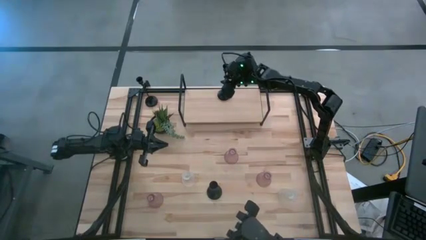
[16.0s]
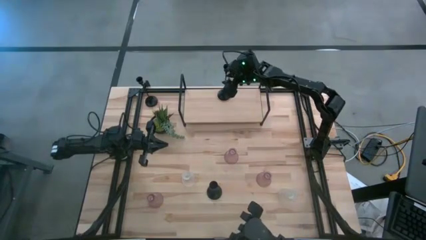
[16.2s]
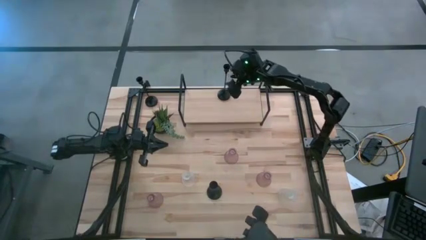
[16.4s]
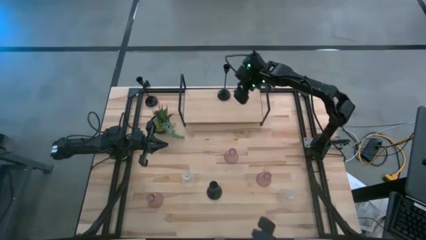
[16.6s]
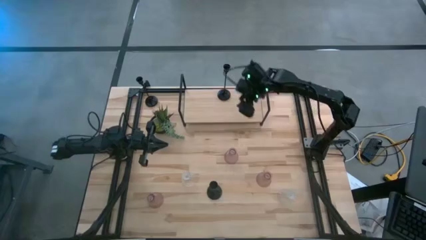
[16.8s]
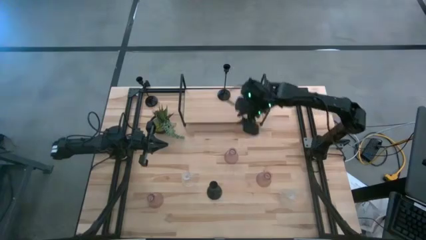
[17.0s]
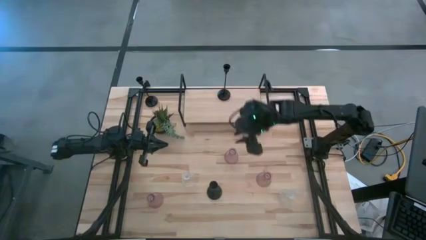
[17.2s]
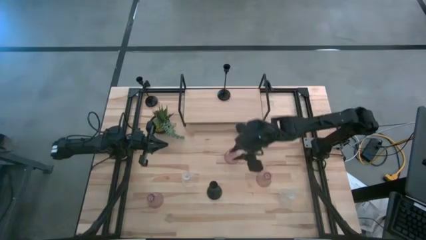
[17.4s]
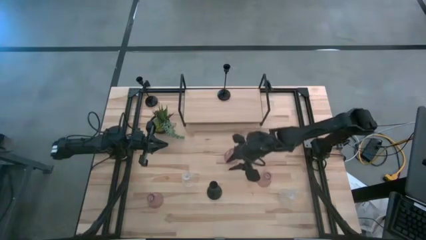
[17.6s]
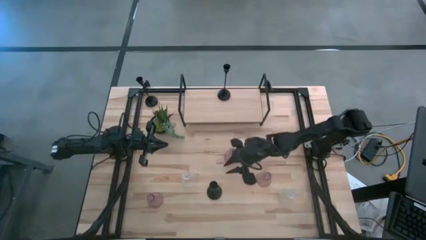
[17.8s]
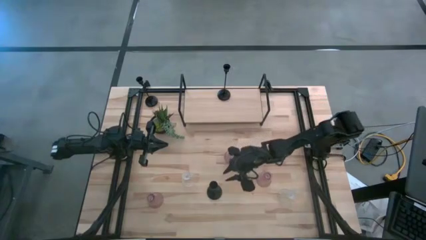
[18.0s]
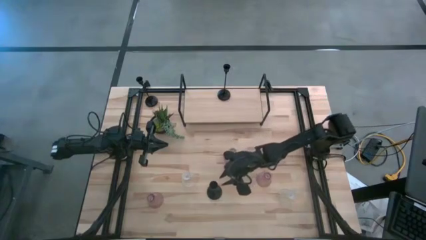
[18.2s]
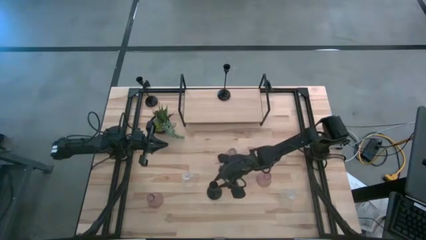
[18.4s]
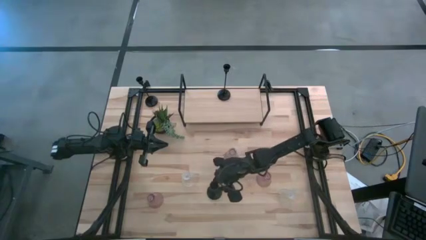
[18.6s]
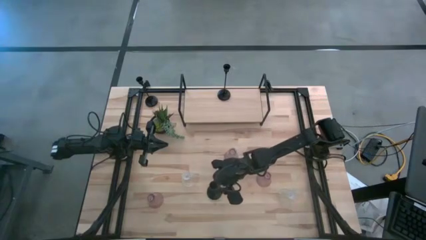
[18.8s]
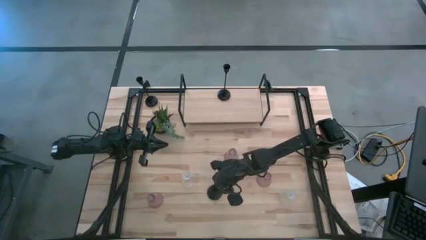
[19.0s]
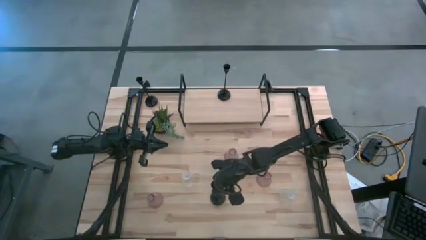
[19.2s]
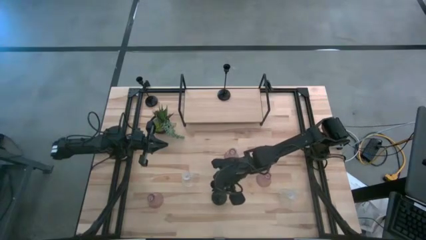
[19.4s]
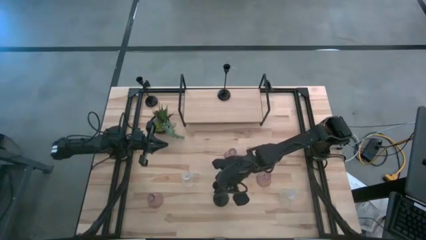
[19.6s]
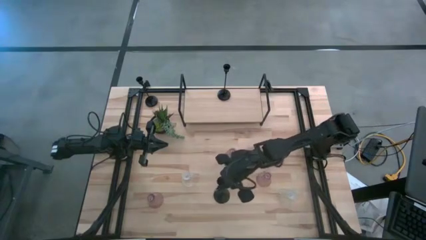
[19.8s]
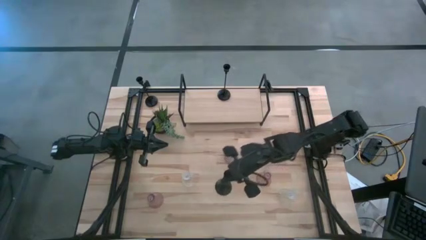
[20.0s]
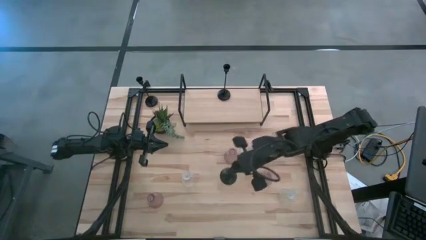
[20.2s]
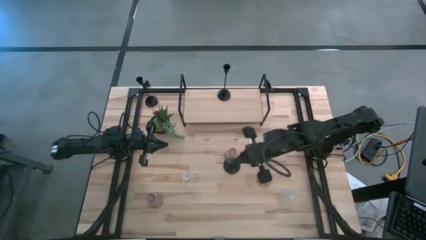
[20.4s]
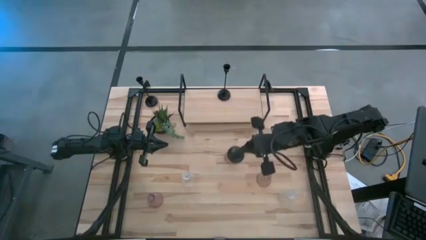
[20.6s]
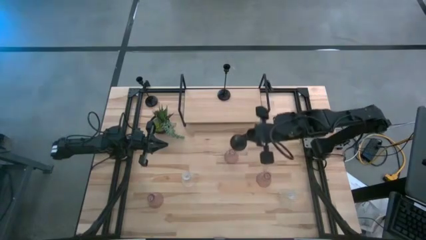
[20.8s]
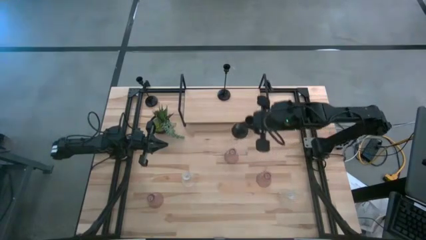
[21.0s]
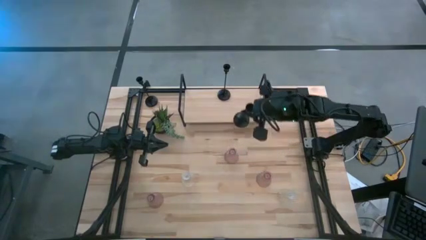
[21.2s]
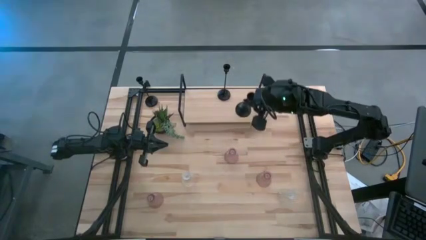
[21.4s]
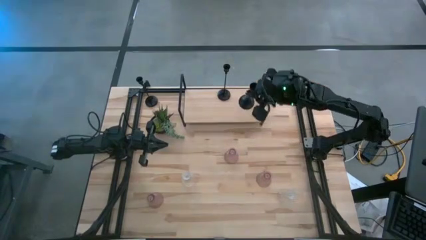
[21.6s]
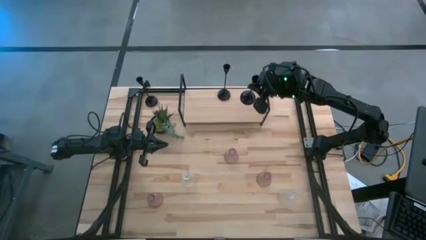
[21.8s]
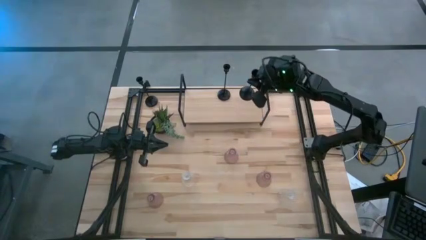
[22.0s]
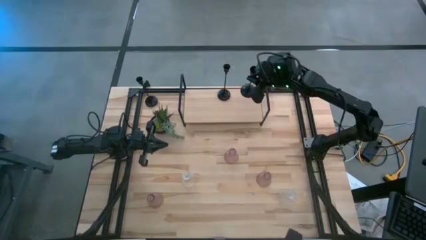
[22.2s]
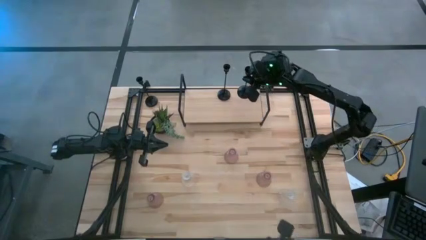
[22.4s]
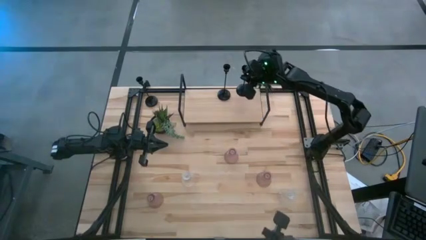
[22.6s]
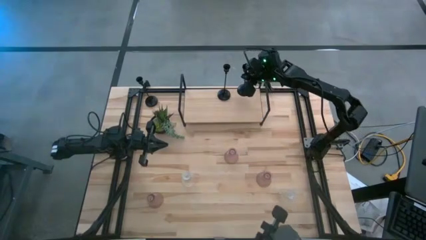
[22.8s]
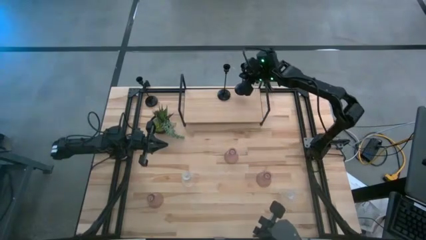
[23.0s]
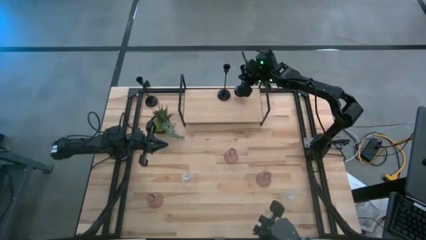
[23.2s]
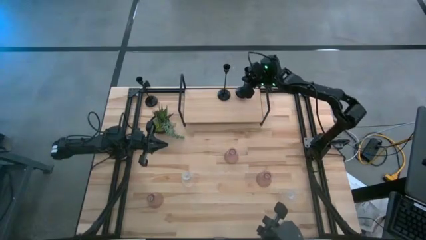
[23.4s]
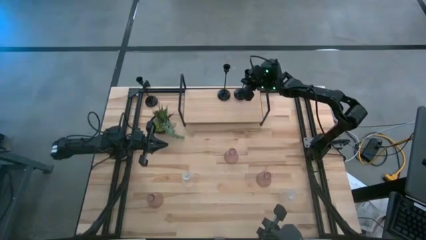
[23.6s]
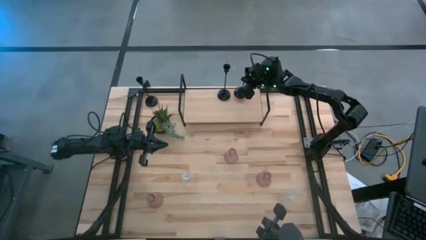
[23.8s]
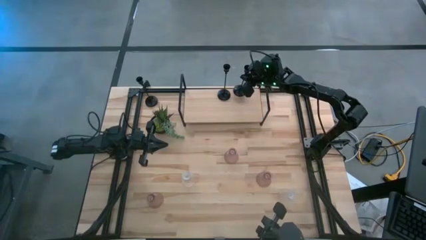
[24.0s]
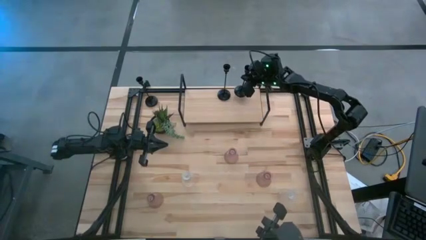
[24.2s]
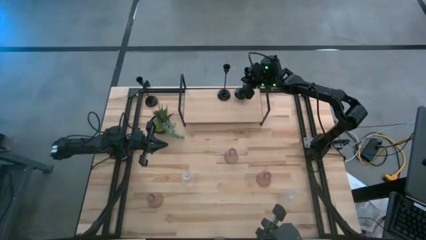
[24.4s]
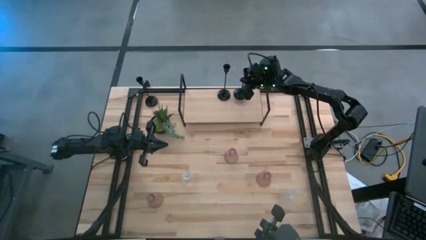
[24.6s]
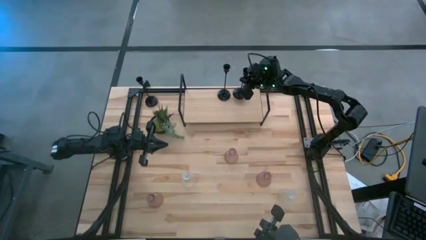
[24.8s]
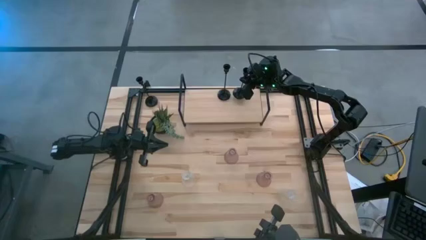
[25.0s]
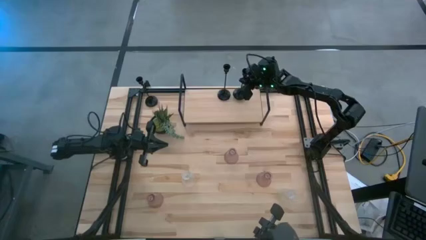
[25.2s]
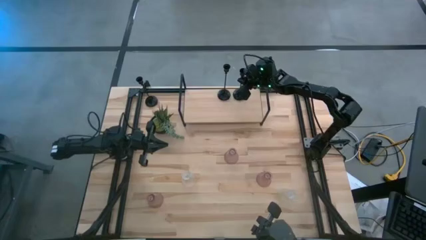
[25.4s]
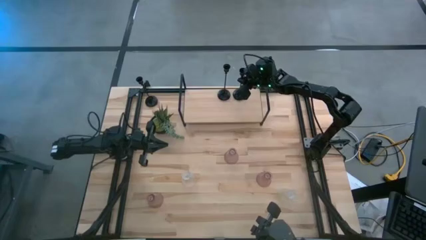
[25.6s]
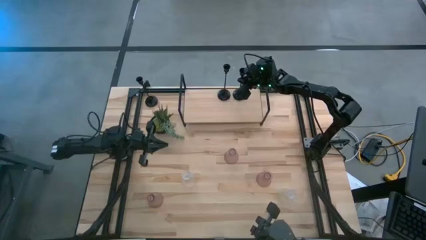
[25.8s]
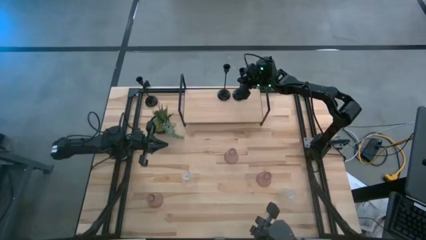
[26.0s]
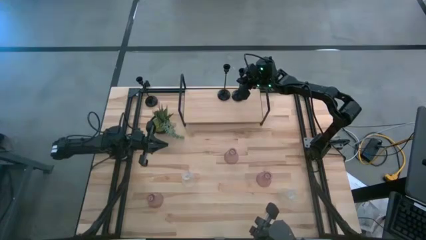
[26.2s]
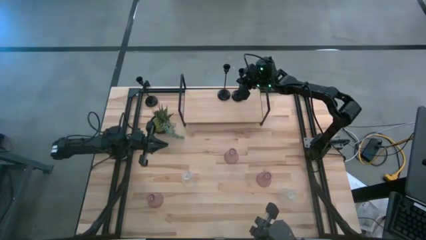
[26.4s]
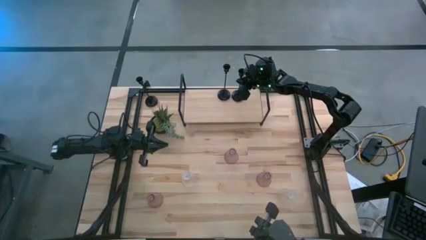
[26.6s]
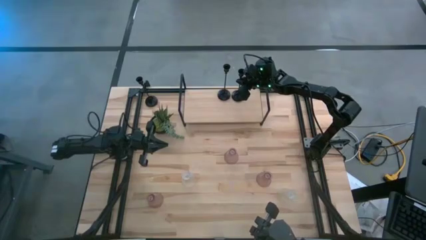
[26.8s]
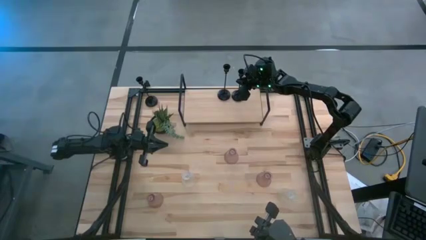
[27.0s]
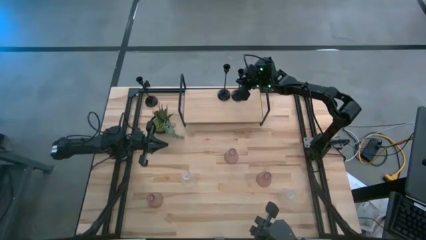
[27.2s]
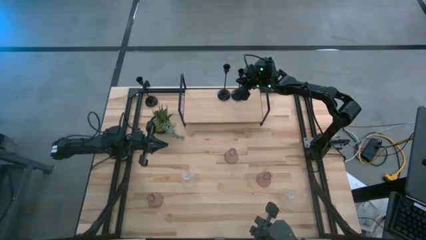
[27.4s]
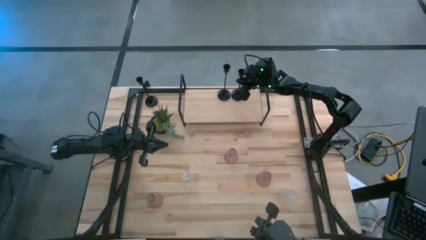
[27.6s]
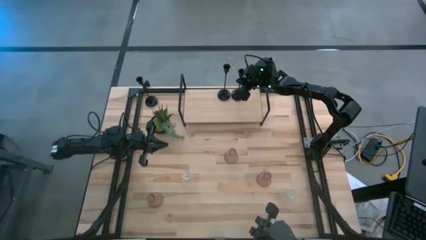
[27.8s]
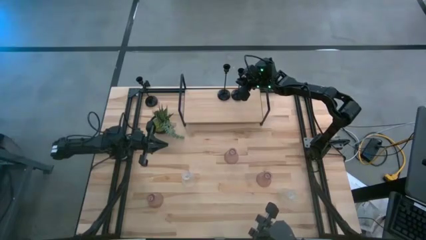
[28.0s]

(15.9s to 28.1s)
Task: Pick & Place candle stick holders
Put the bottom black candle holder on the shelf aligned with the other black candle holder

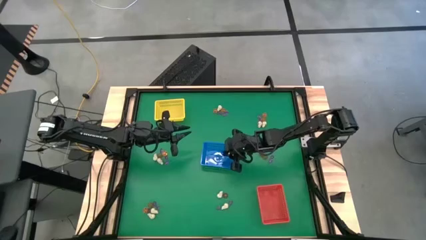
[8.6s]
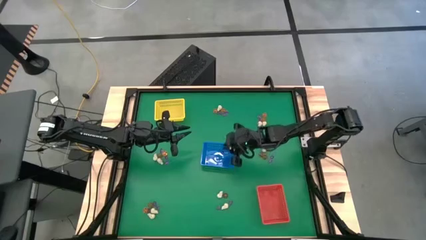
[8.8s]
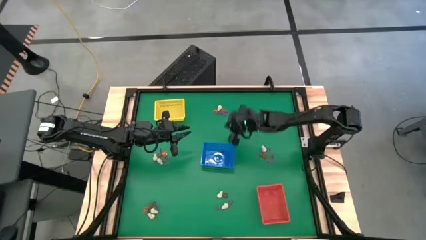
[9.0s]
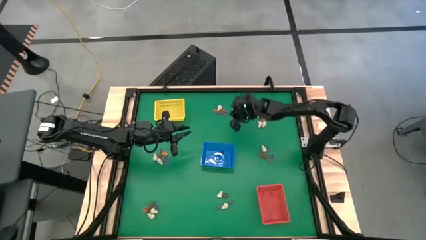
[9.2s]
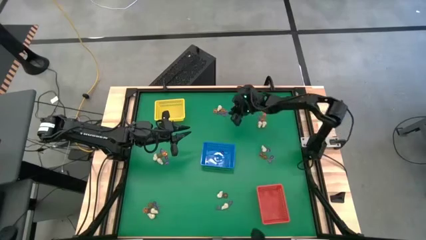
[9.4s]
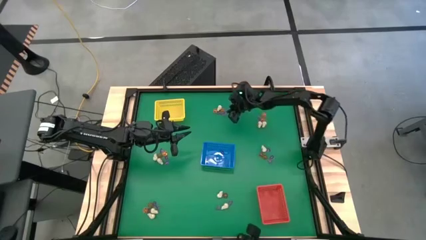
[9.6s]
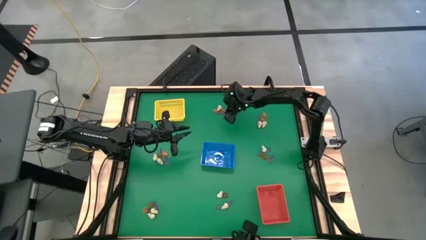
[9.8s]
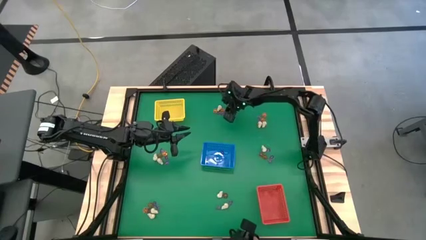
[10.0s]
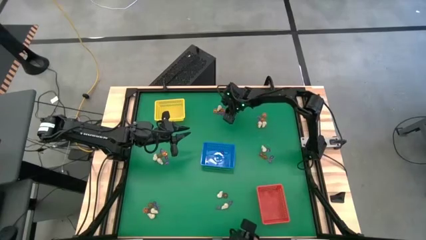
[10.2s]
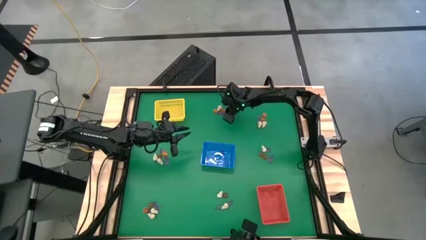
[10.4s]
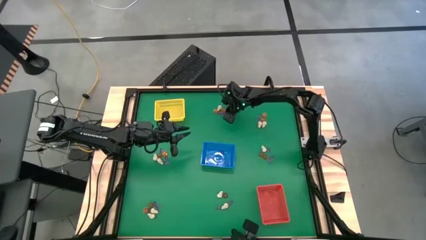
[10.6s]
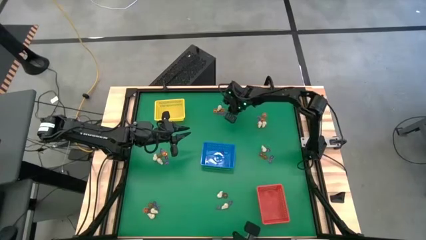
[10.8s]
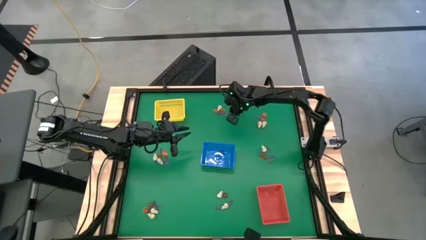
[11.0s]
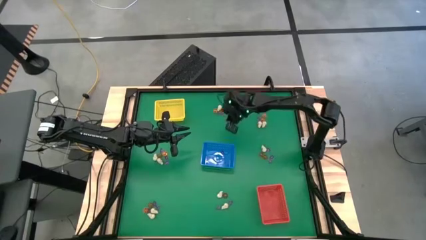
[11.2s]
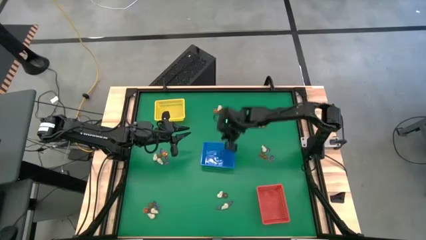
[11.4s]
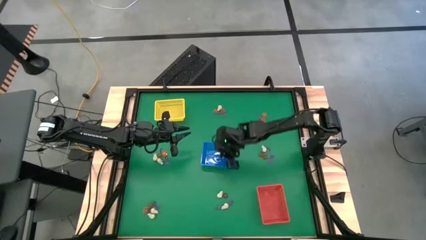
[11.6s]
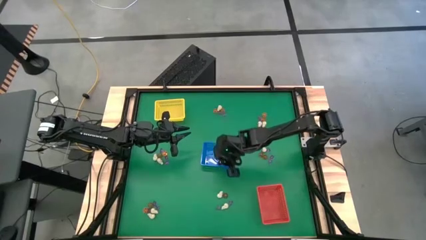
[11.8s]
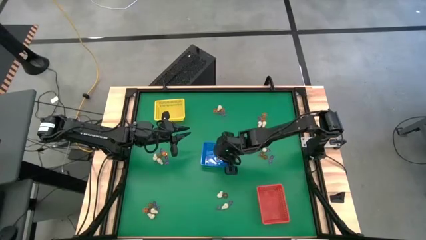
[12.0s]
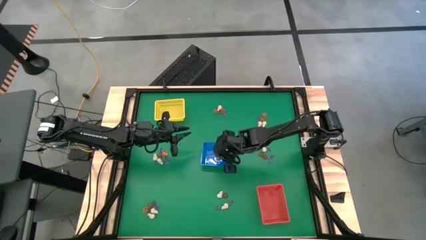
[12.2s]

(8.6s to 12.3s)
Task: Sort Halloween decoration
Put the witch hat toy into the blue bin
